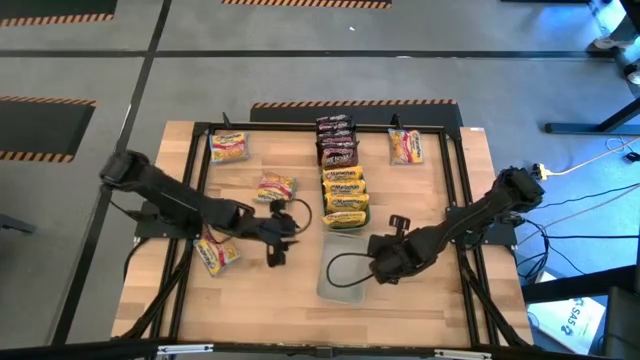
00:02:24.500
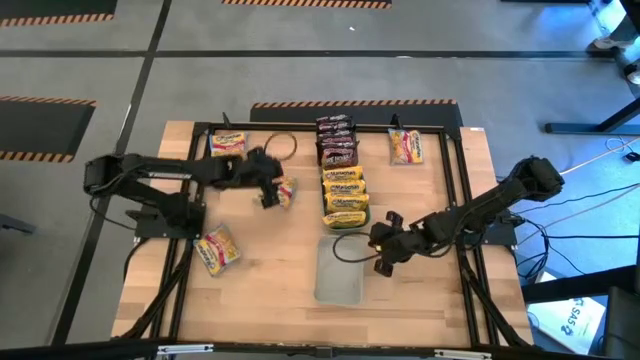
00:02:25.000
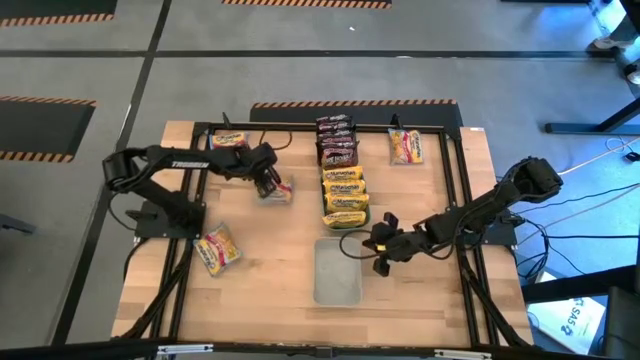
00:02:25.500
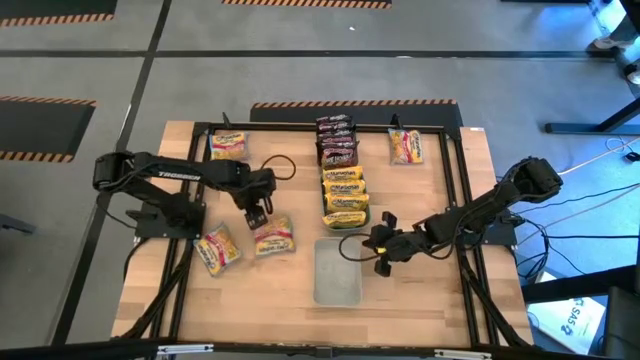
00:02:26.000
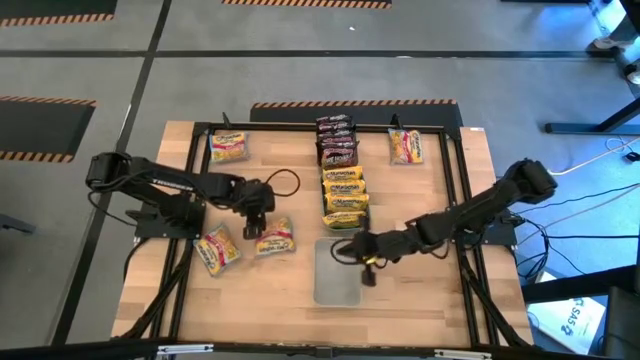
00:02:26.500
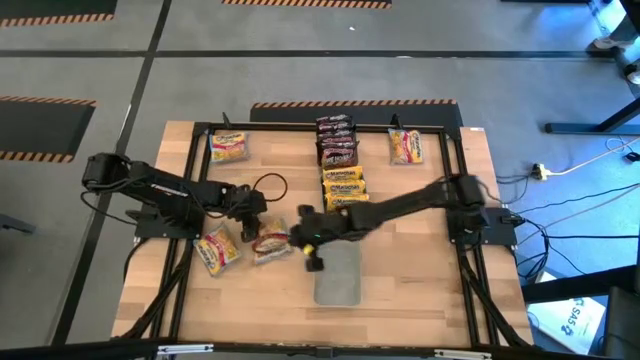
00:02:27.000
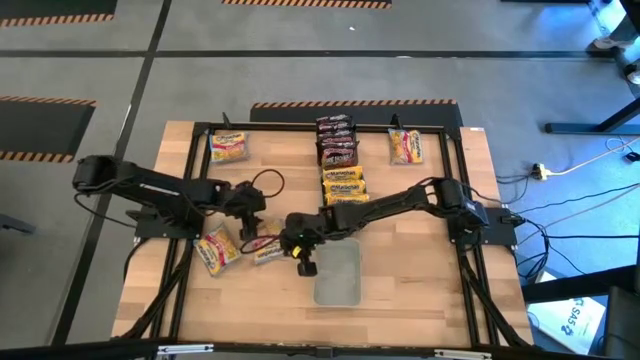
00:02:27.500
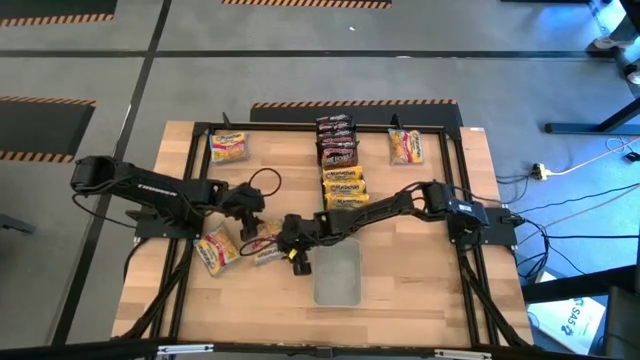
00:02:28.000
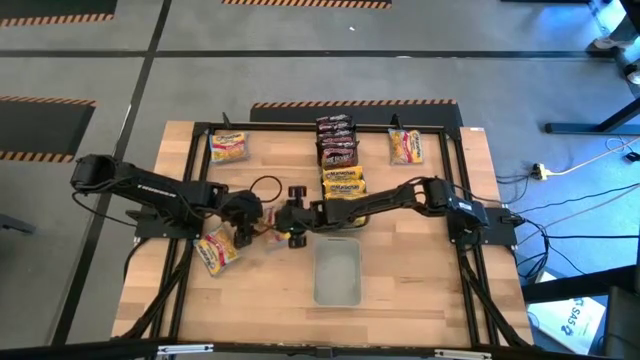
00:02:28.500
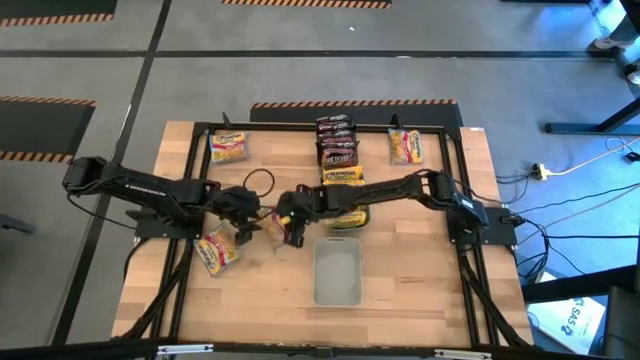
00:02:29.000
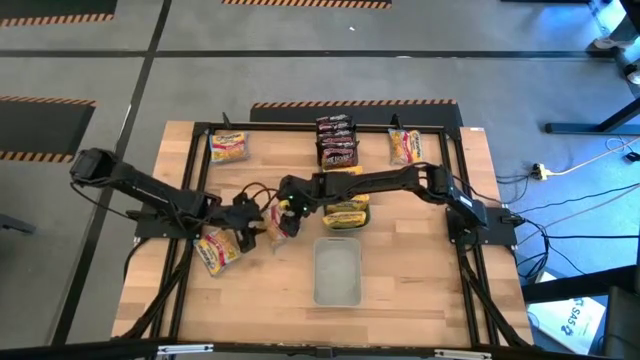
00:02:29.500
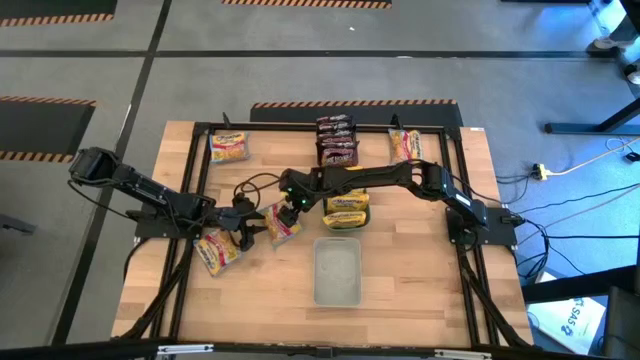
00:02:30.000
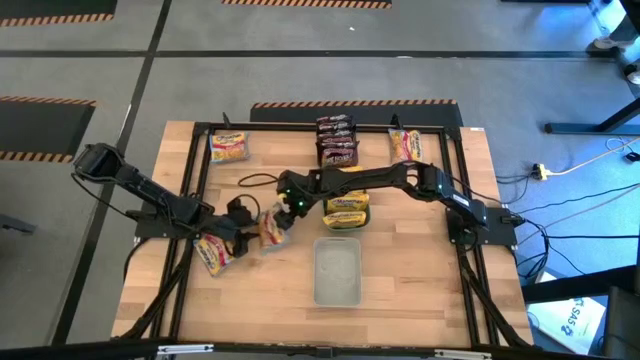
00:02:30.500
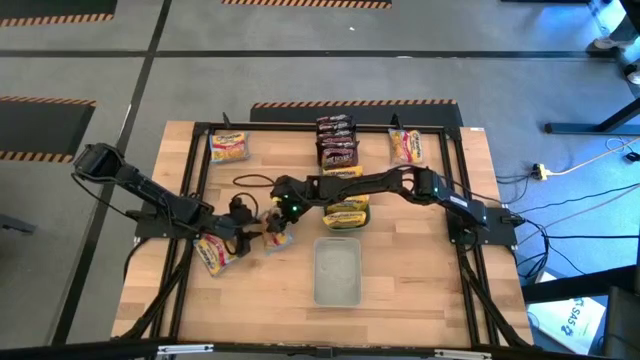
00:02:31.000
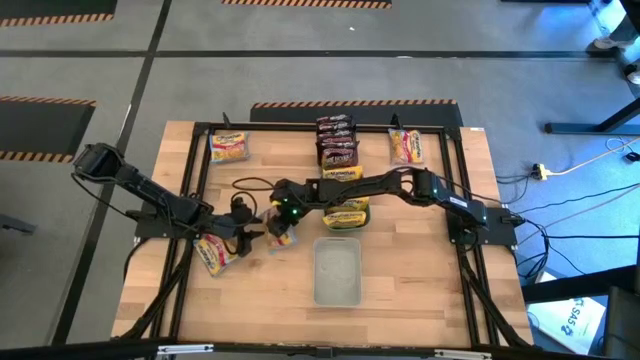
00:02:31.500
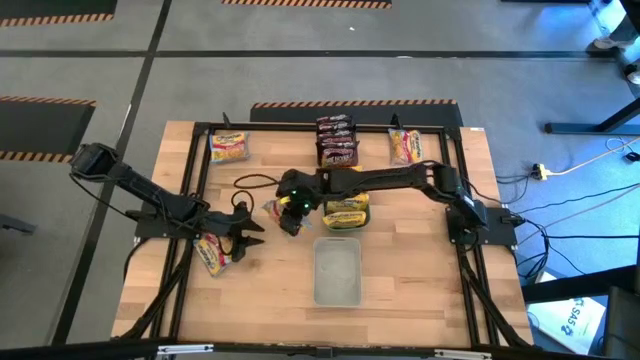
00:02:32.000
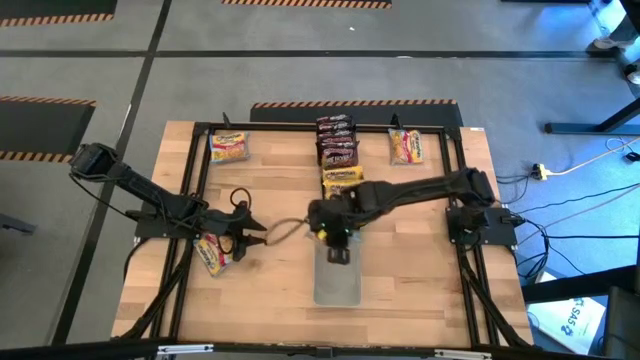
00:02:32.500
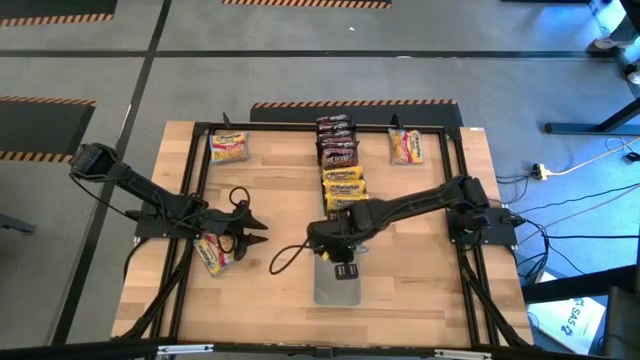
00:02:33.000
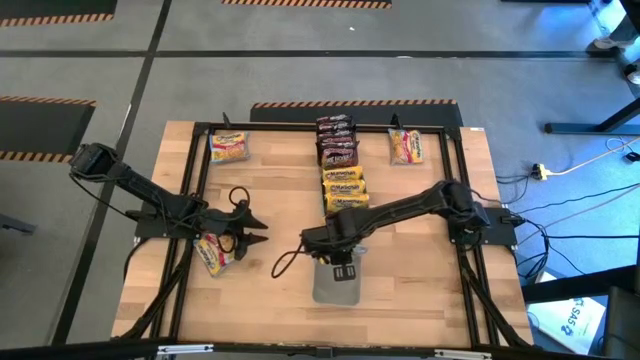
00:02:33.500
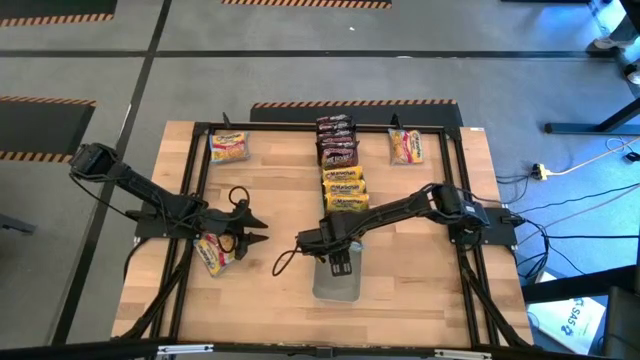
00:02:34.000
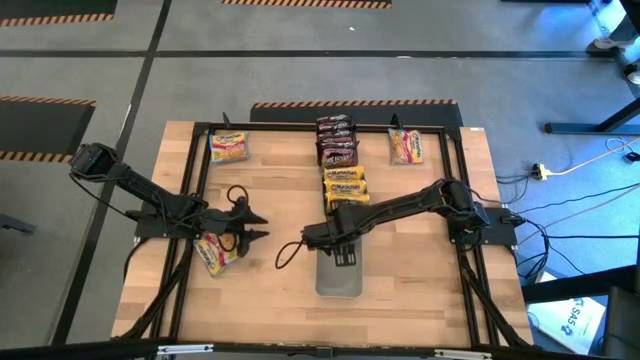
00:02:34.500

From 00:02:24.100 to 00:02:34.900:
Task: Sort Maruchan noodles
Put the blue noodle pack into the gray bin

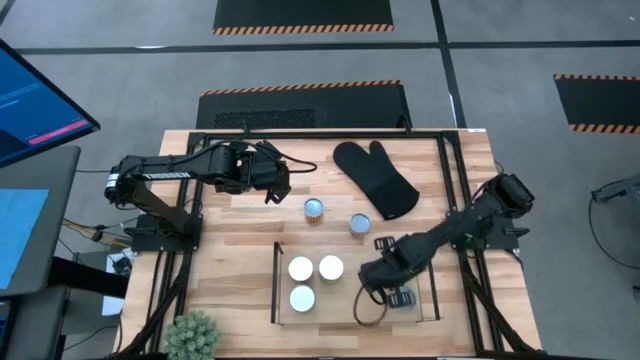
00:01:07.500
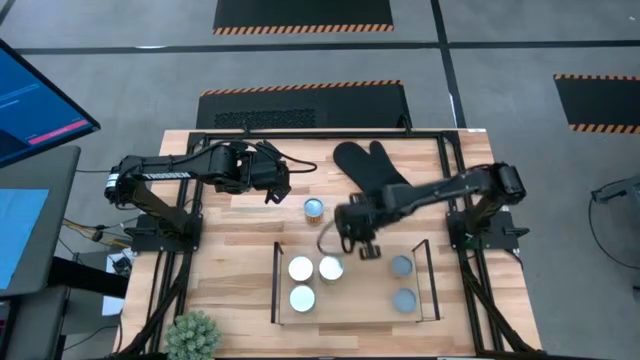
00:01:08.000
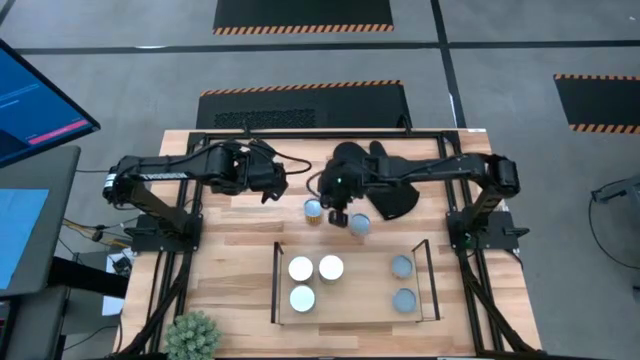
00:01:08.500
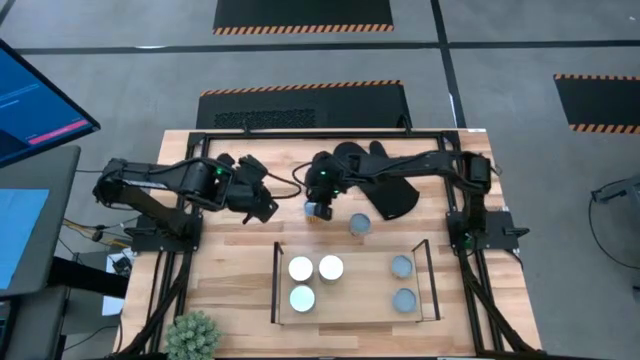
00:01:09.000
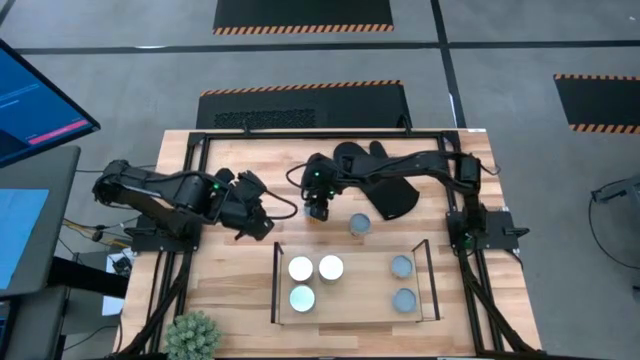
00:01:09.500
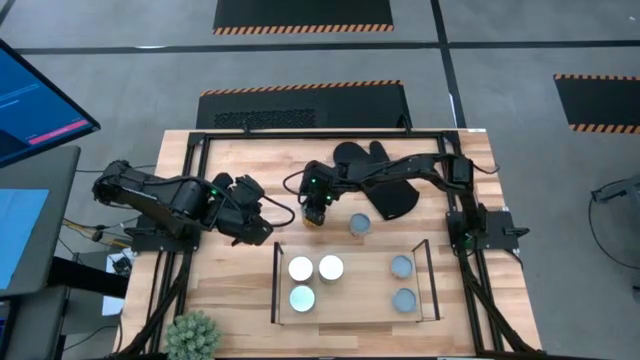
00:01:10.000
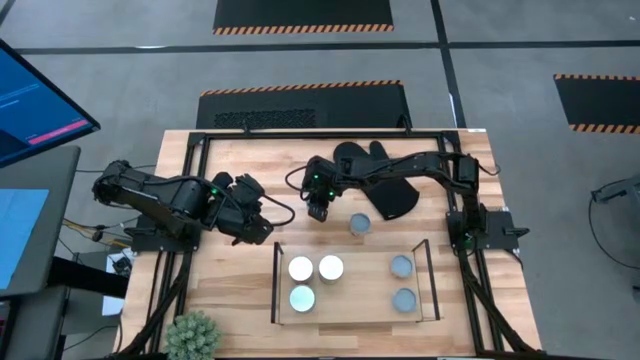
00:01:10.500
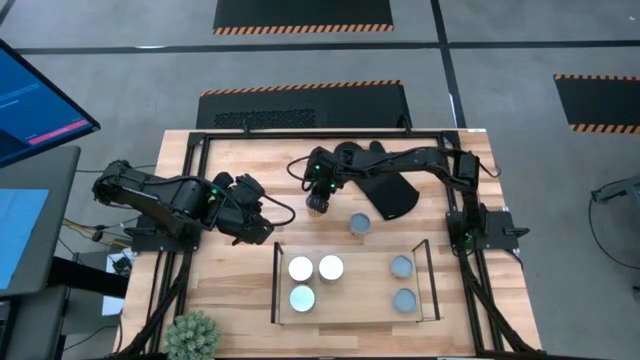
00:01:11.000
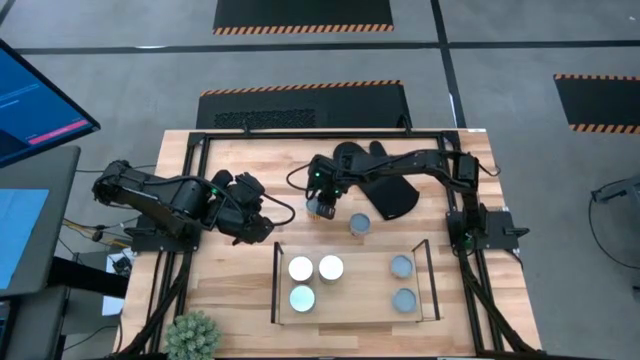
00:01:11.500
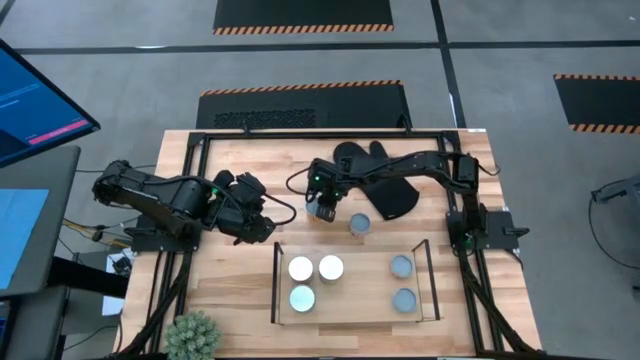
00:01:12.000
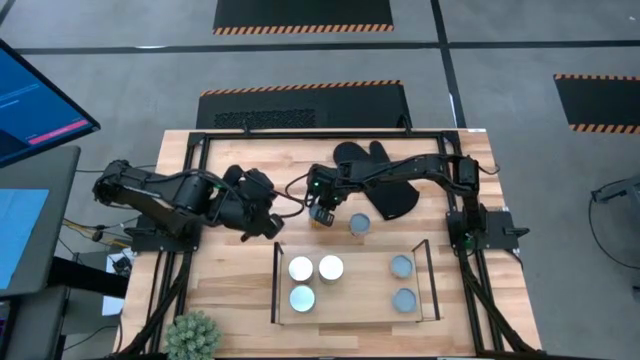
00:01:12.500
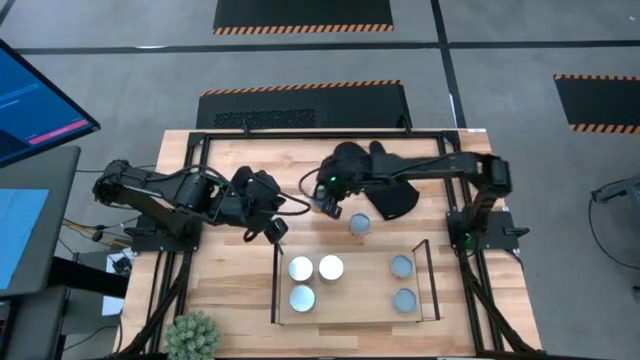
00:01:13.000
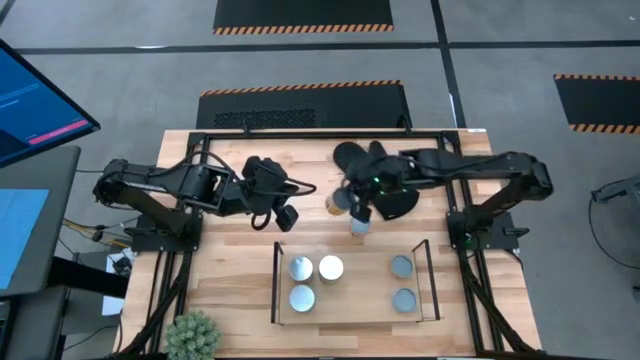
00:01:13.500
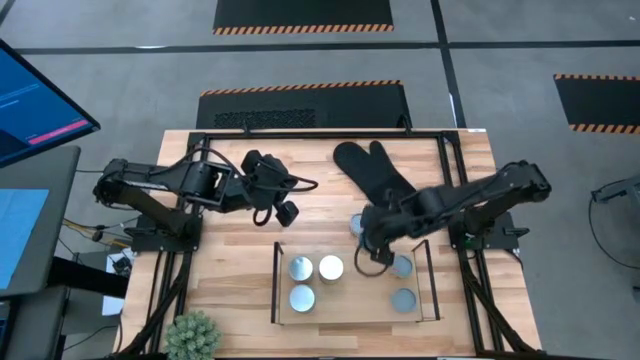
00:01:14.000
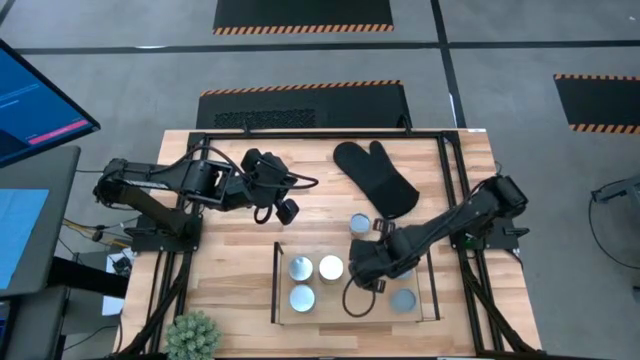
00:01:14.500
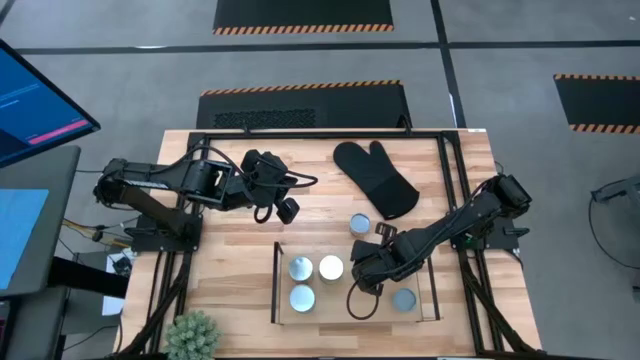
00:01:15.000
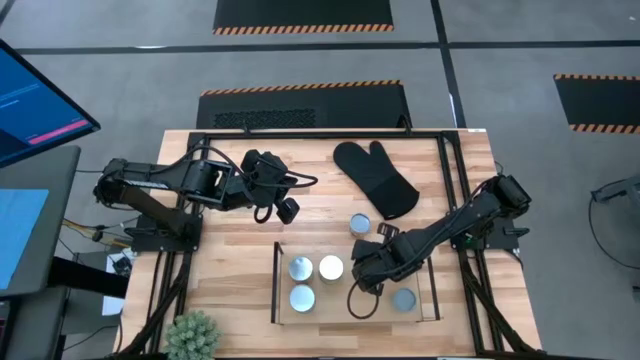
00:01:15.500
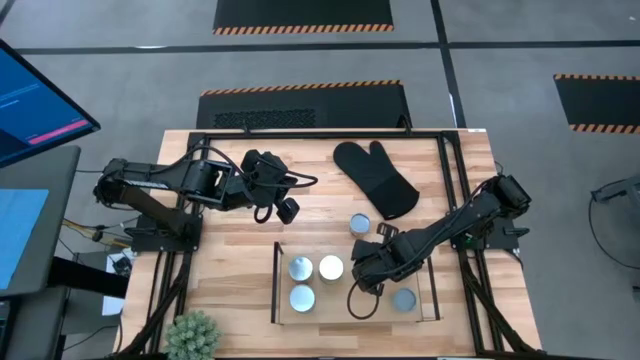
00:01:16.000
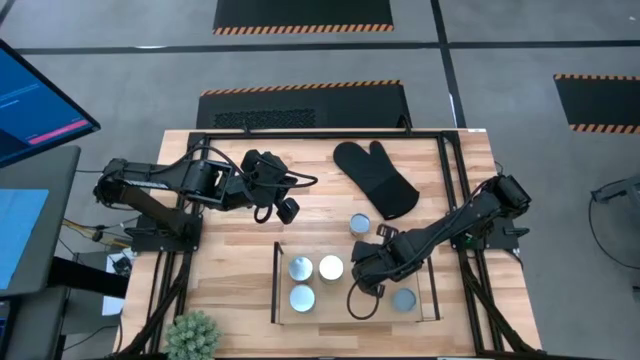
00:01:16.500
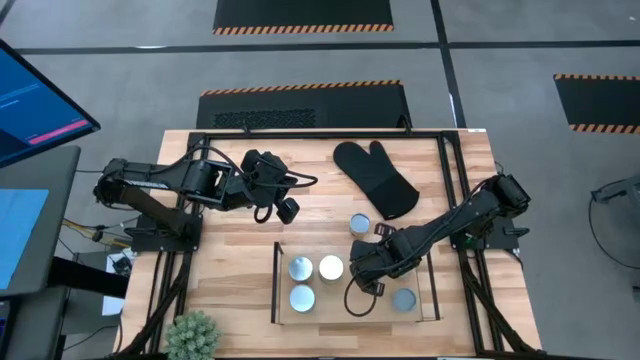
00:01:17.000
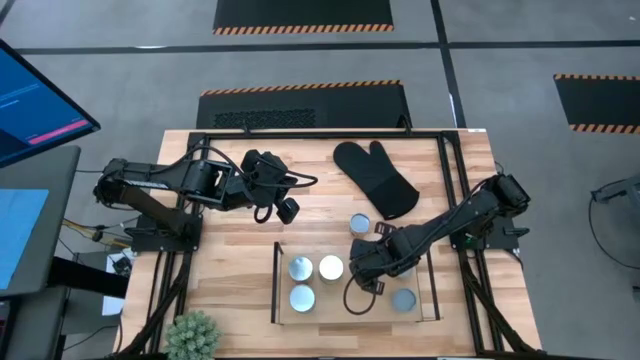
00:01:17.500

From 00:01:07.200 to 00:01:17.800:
Task: Pick and place cans onto a shelf
Put the canned black beans on the shelf
